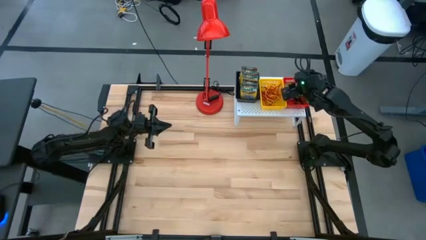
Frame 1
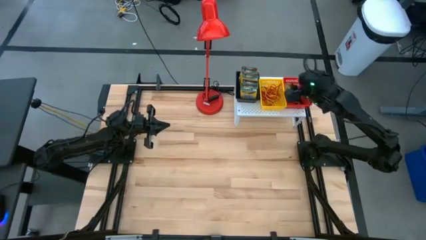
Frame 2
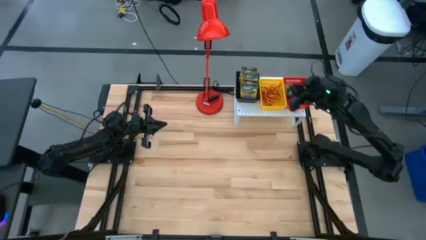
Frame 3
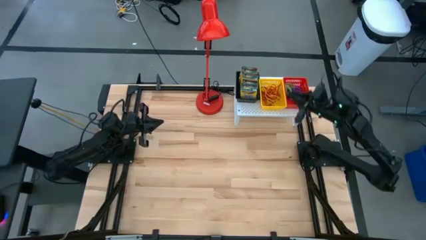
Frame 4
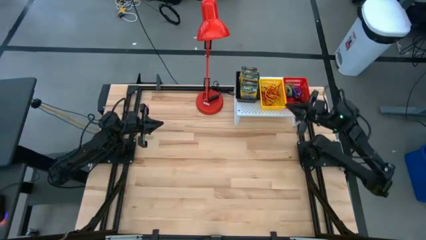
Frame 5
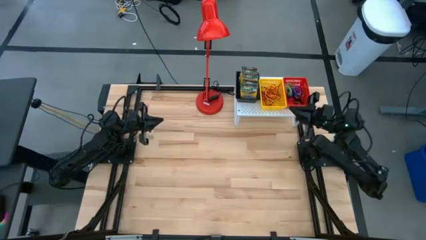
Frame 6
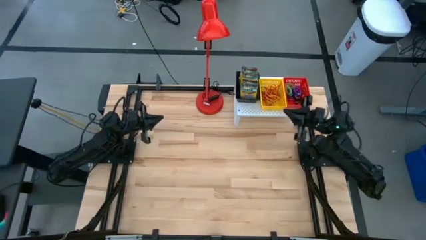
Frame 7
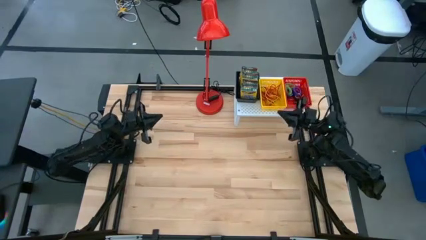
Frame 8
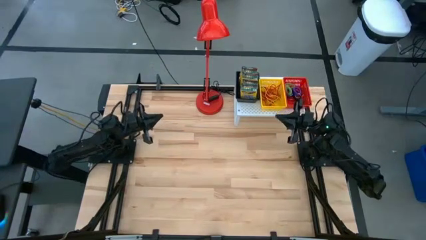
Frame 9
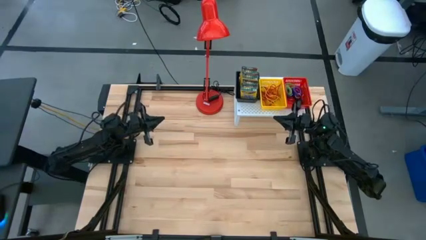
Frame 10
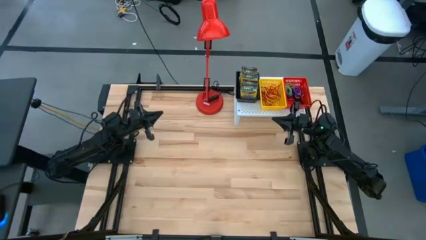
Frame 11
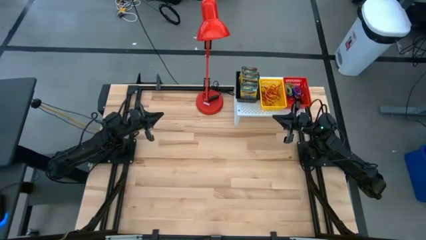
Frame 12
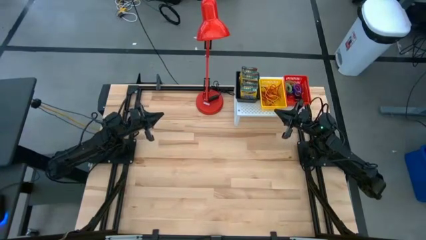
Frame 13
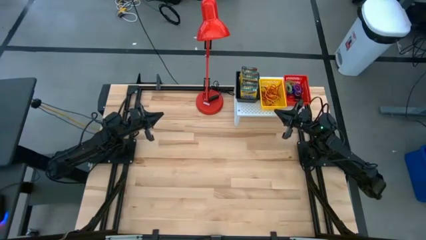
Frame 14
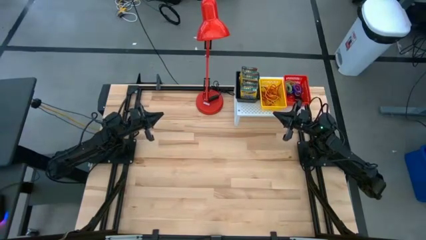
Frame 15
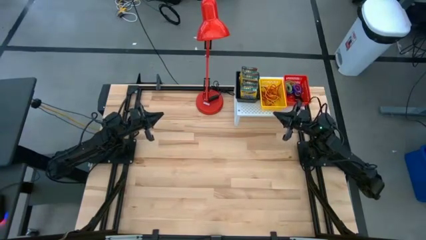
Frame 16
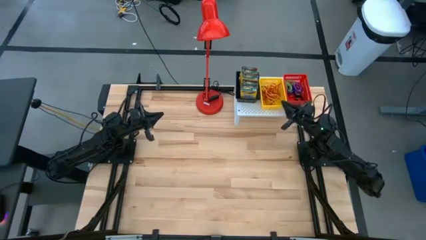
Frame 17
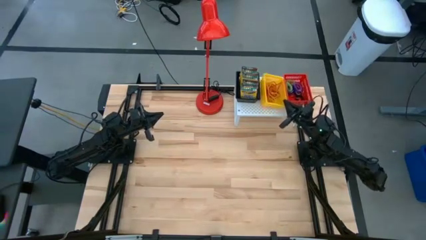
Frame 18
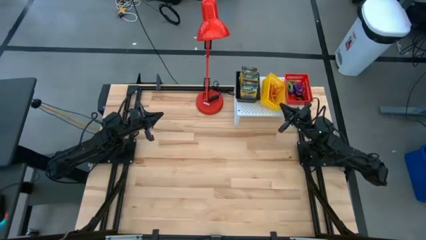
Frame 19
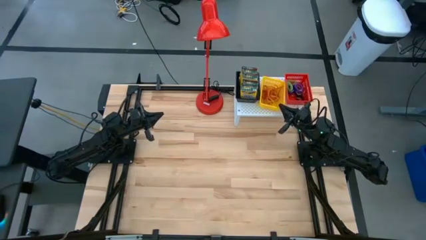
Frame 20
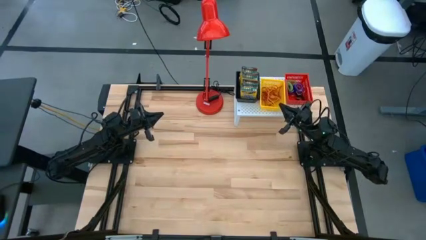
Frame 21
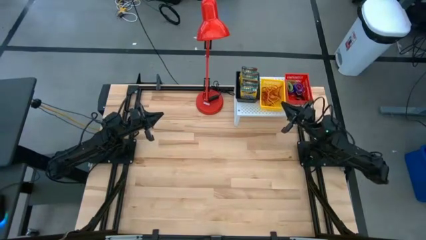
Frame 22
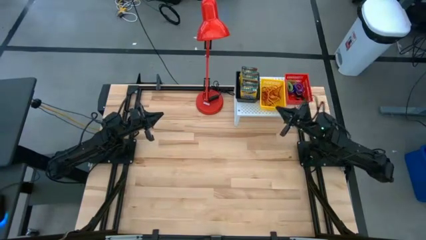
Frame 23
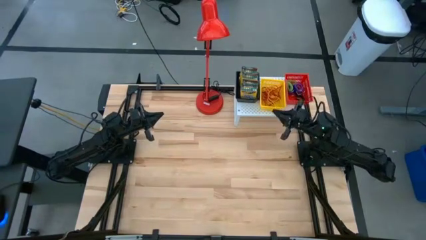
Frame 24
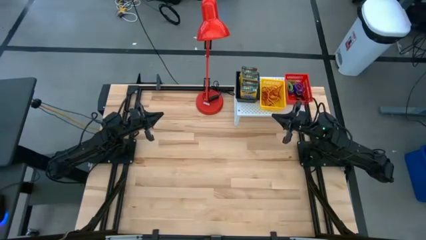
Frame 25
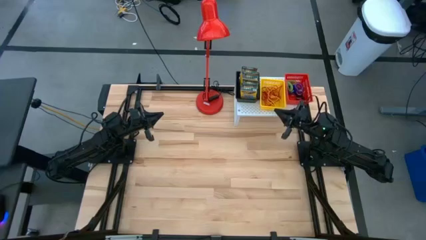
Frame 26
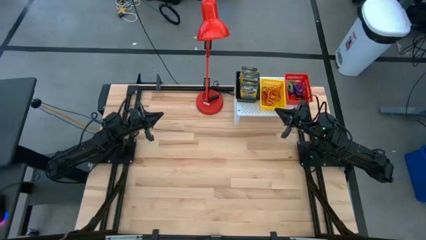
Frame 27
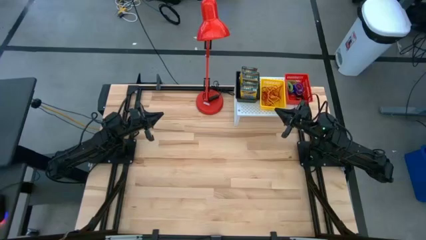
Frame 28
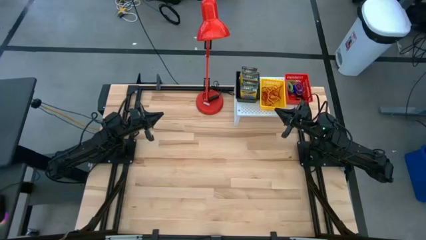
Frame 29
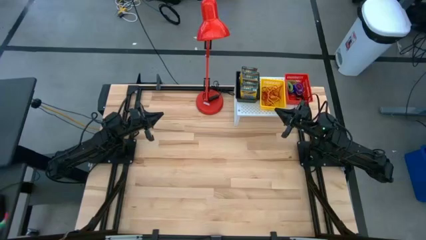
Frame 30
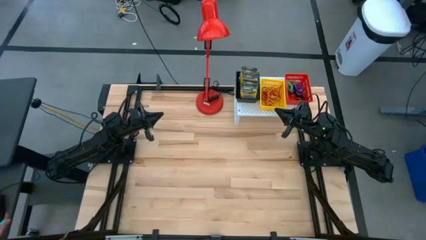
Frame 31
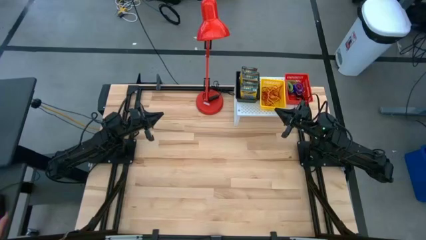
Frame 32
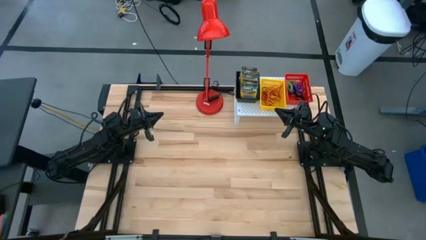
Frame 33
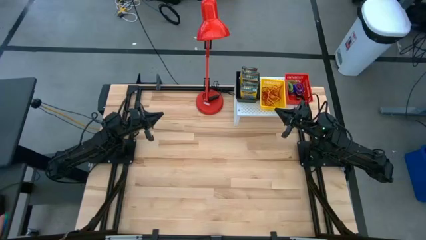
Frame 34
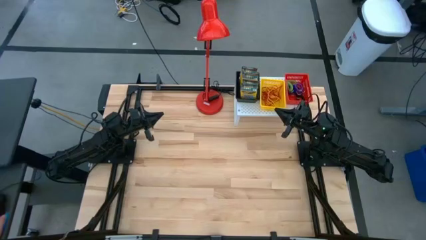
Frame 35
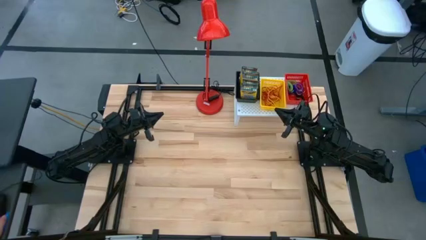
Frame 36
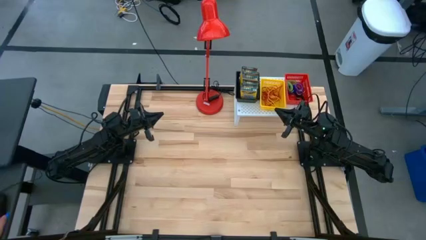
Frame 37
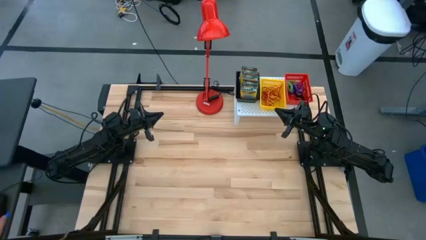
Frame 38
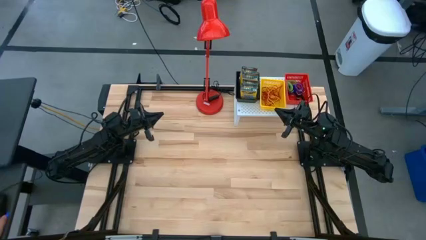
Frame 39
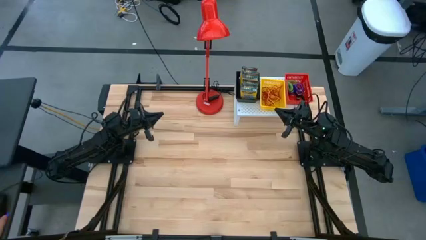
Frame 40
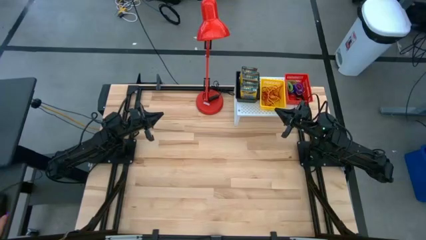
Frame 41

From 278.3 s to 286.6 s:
Task: Pick & Place Office Desk Supplies
Return to home position

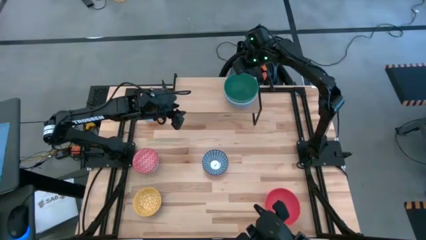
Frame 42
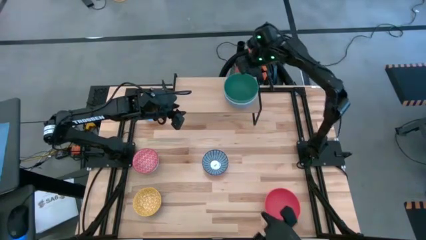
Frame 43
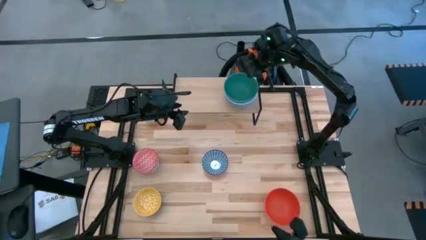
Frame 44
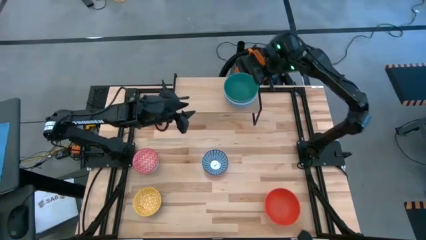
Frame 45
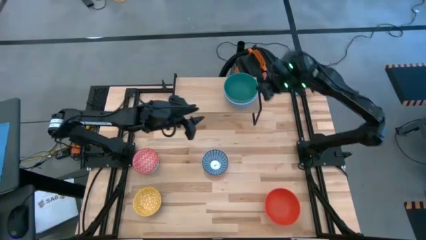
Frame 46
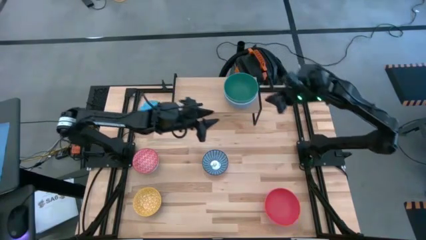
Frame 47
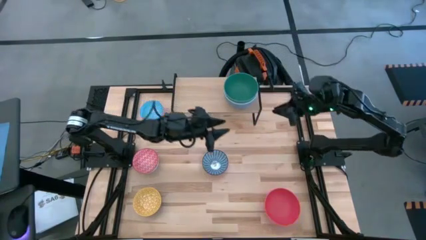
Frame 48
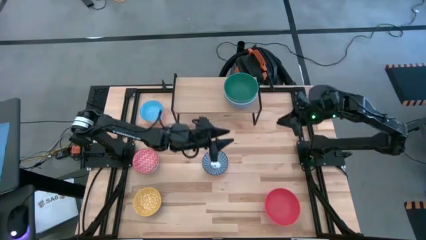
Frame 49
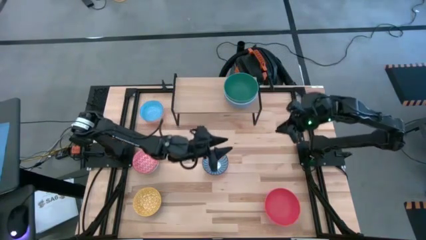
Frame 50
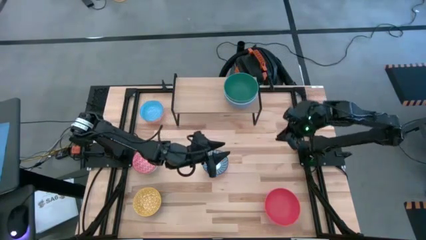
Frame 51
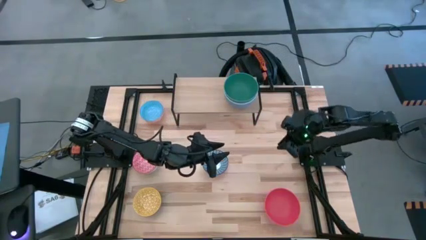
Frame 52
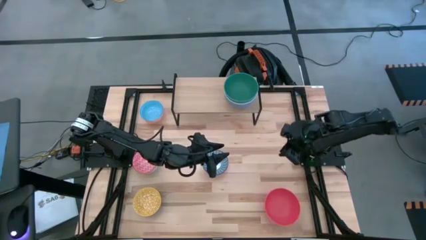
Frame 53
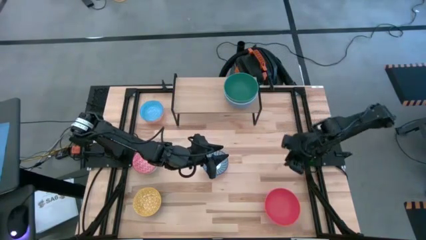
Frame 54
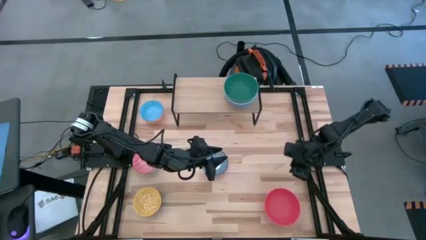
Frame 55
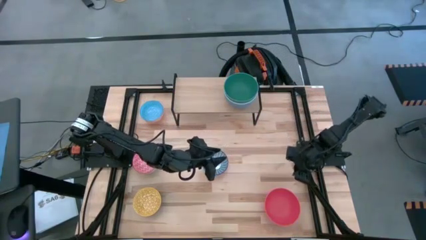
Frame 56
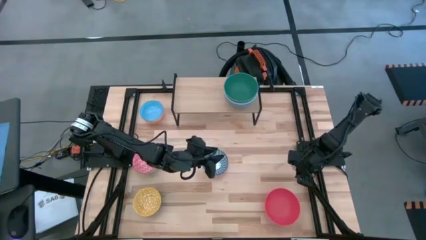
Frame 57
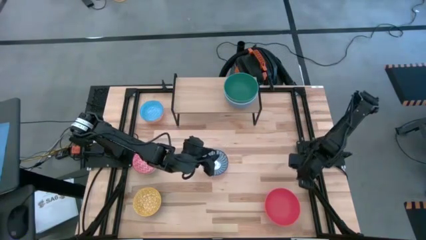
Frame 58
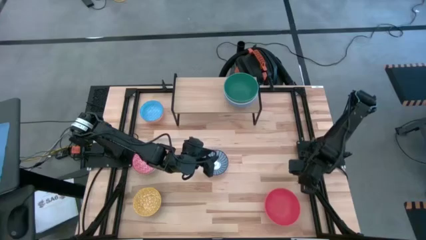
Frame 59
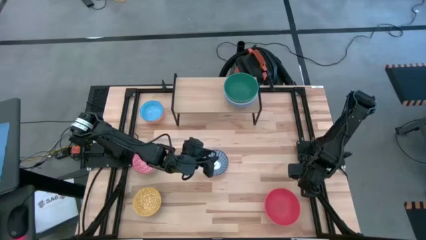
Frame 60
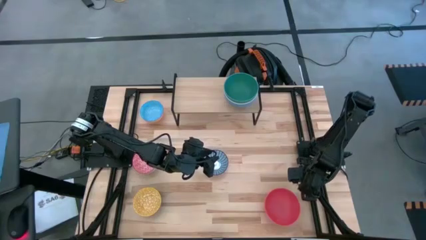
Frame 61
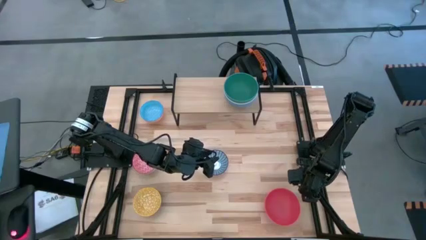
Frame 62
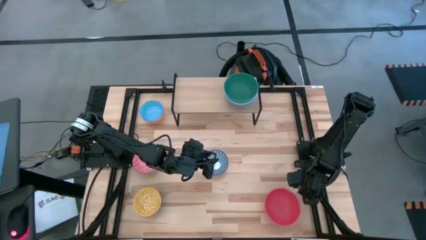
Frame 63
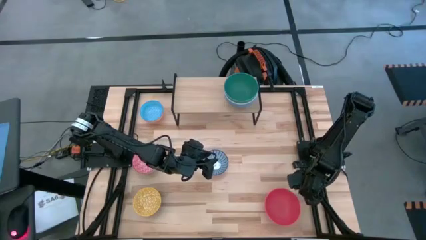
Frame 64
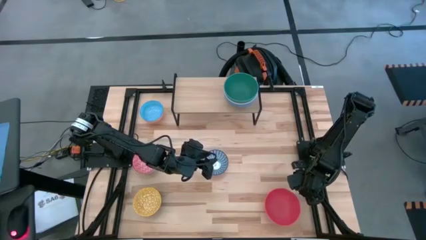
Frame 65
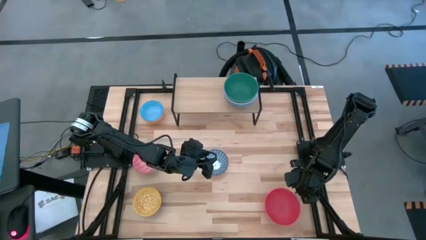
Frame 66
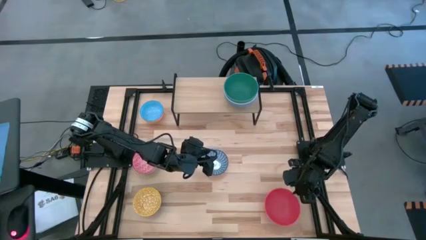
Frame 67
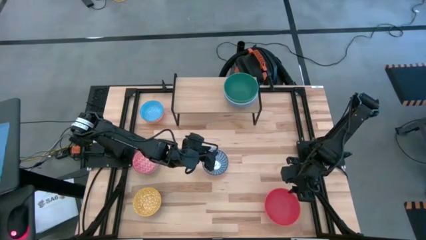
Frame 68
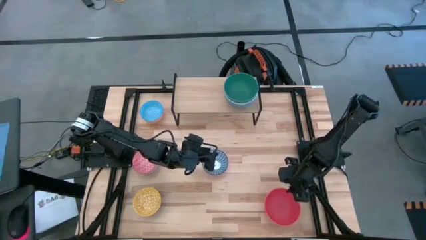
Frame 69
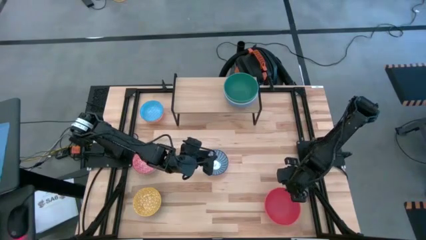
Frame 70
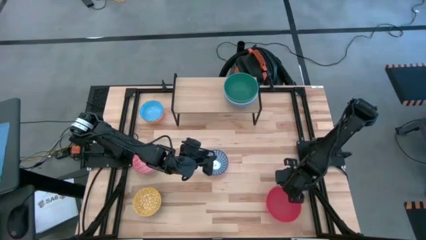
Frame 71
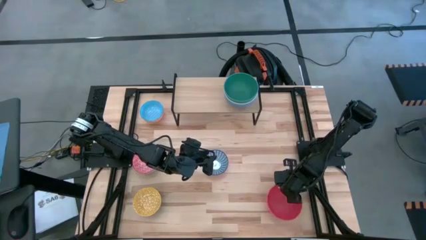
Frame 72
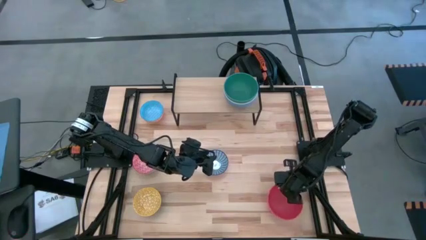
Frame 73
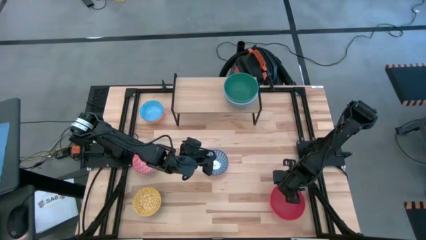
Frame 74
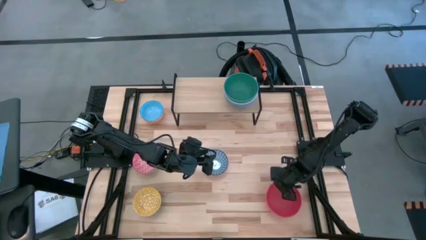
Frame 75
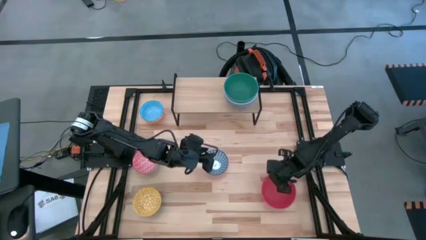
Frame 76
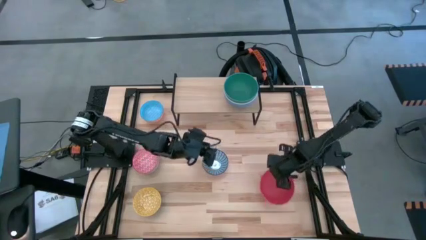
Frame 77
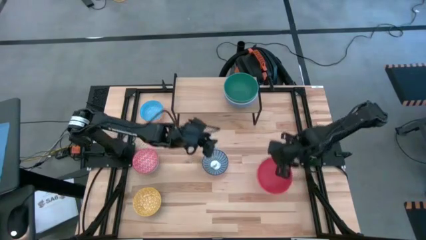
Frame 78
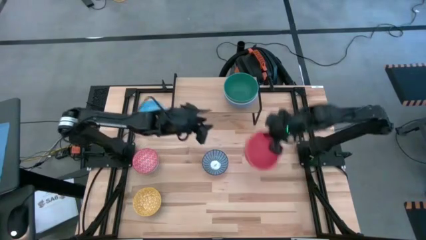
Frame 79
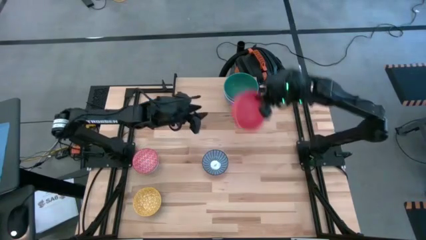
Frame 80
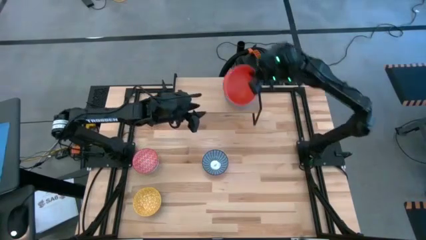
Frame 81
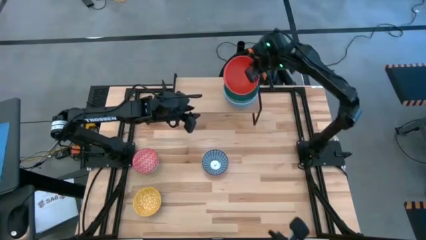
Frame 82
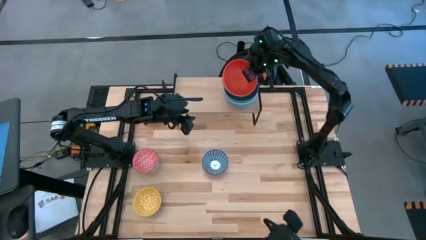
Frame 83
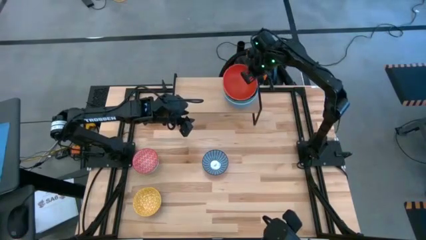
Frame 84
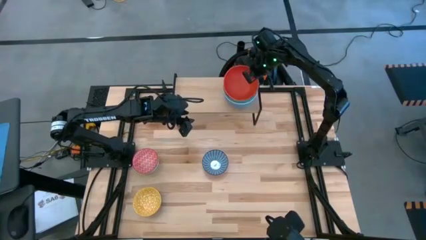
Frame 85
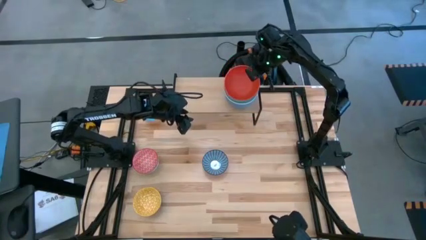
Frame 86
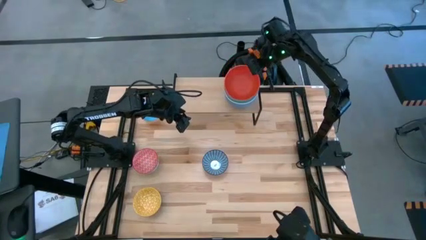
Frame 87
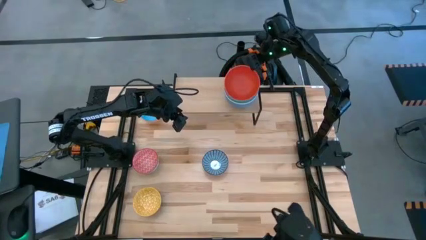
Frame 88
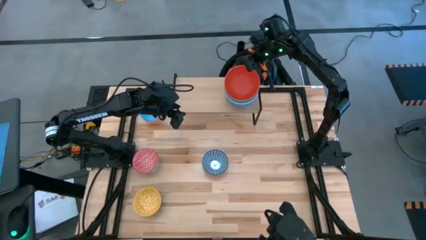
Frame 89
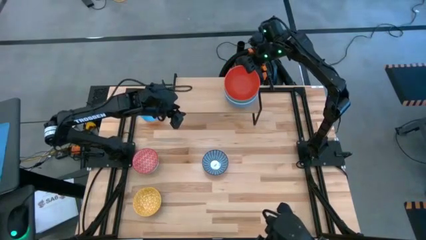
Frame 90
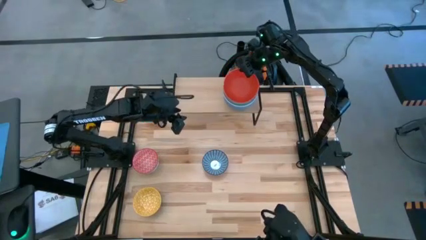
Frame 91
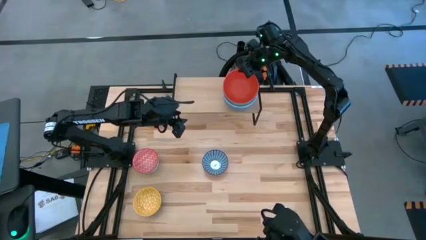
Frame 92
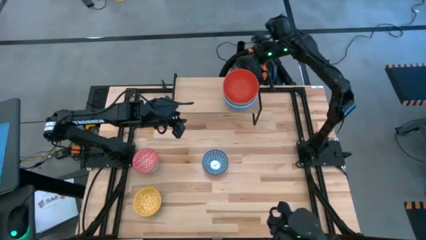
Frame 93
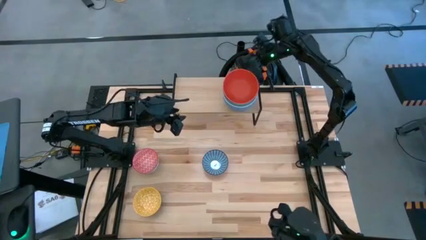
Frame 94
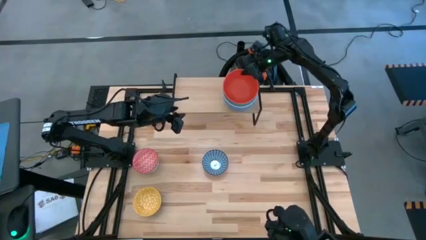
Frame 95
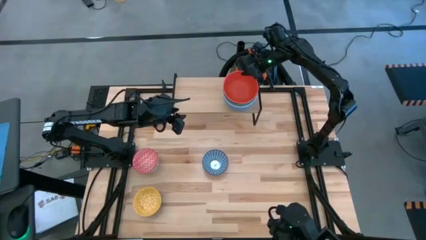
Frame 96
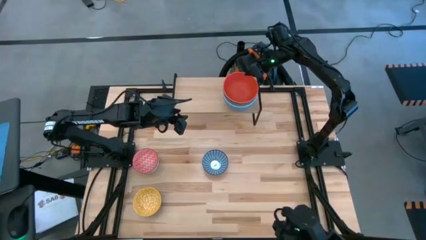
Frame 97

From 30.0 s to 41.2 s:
Task: Place and stack bowls onto a shelf
Stack the orange bowl on top of the green bowl on the shelf
